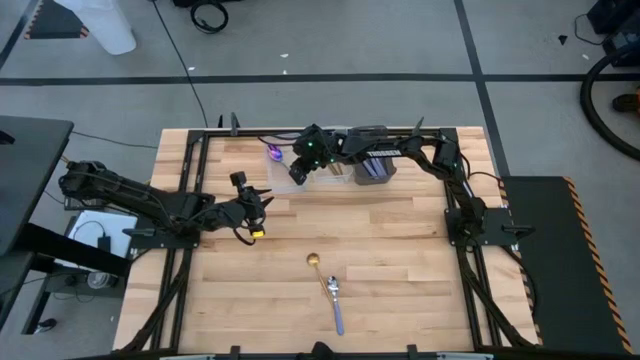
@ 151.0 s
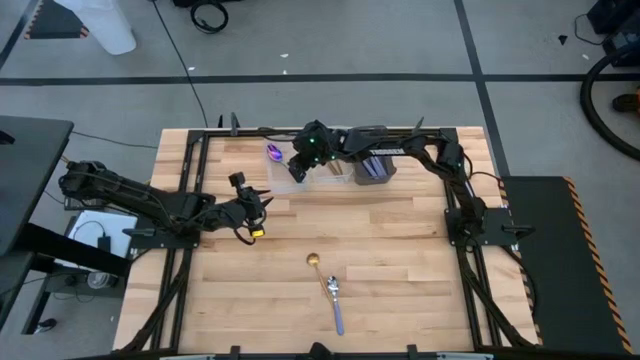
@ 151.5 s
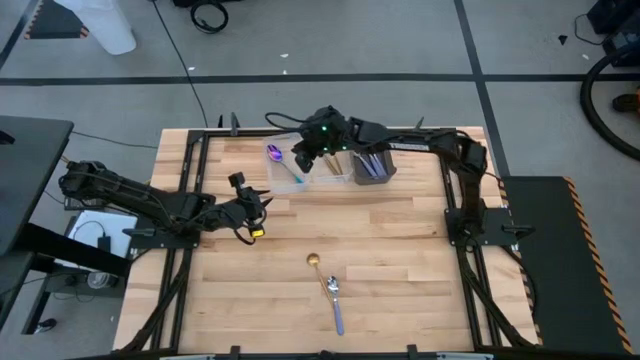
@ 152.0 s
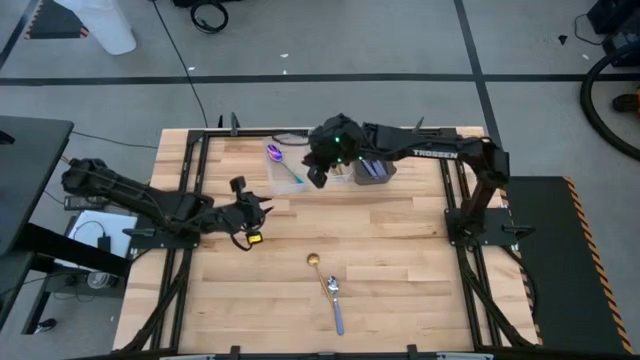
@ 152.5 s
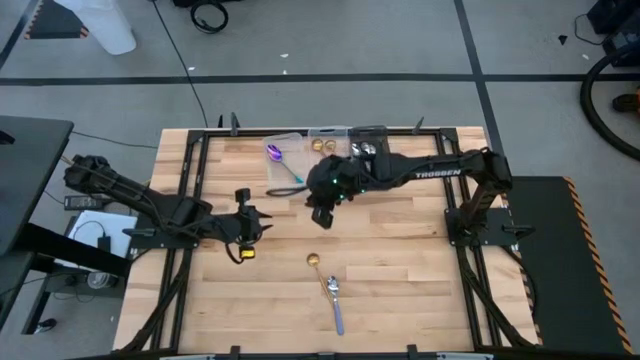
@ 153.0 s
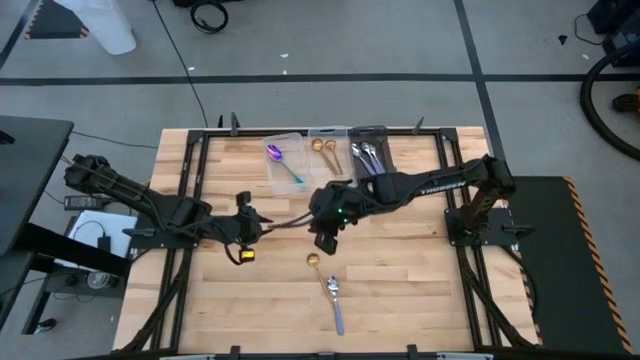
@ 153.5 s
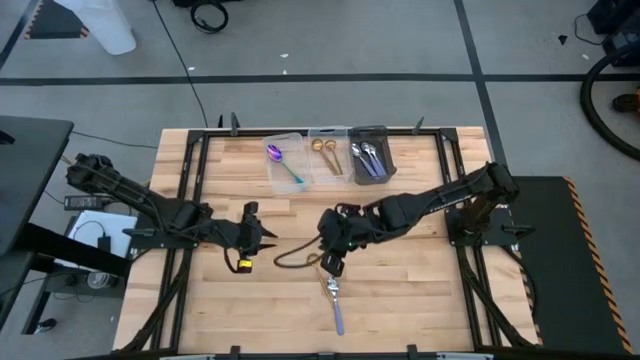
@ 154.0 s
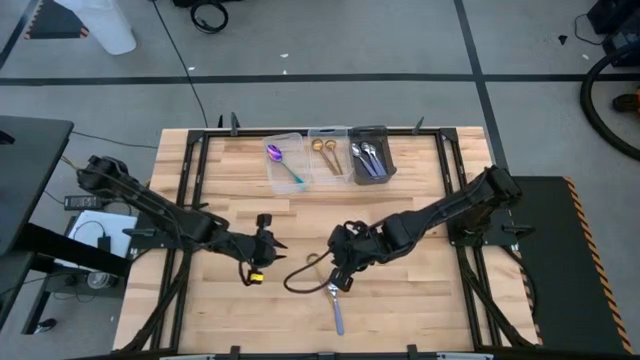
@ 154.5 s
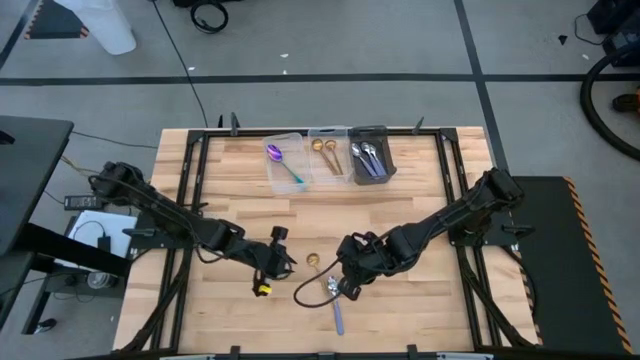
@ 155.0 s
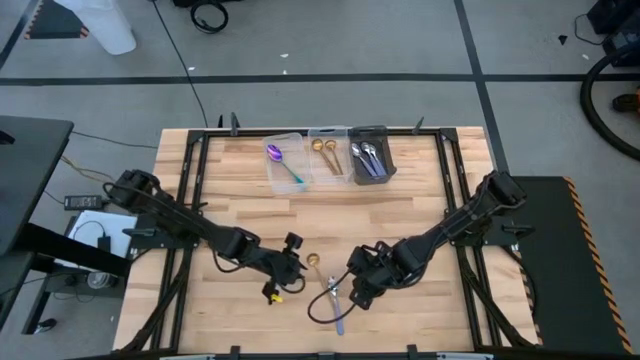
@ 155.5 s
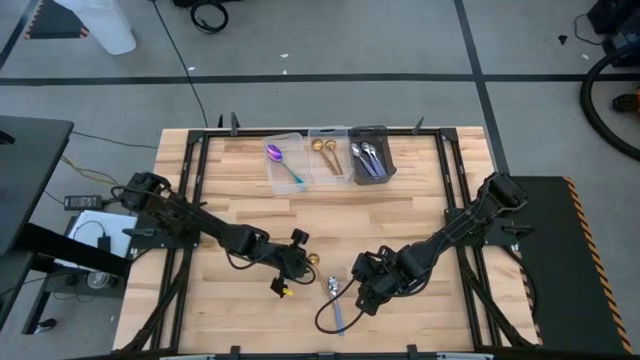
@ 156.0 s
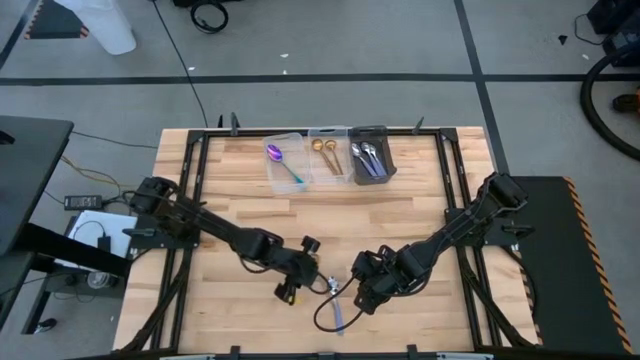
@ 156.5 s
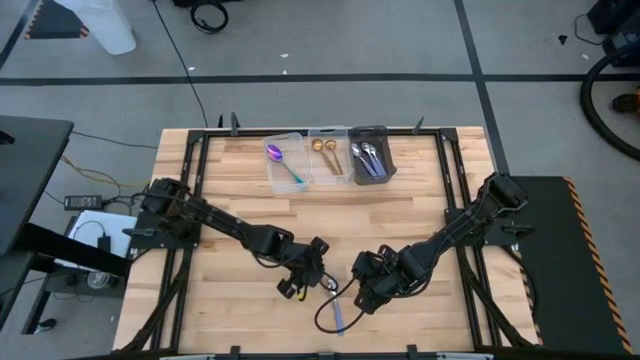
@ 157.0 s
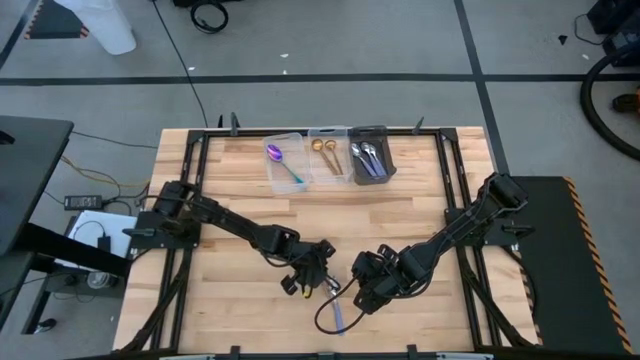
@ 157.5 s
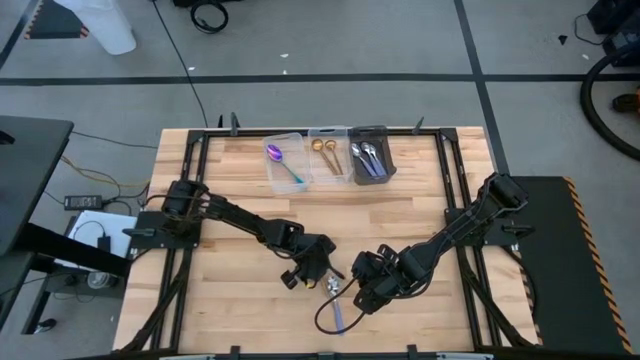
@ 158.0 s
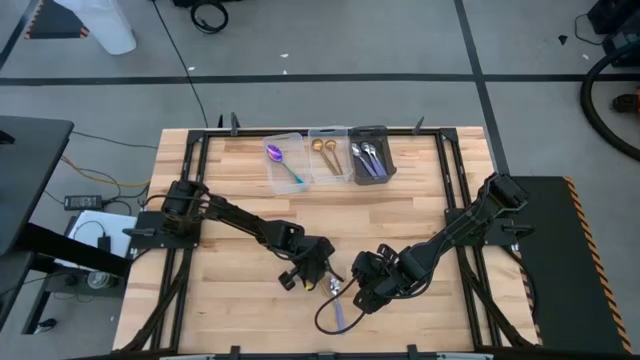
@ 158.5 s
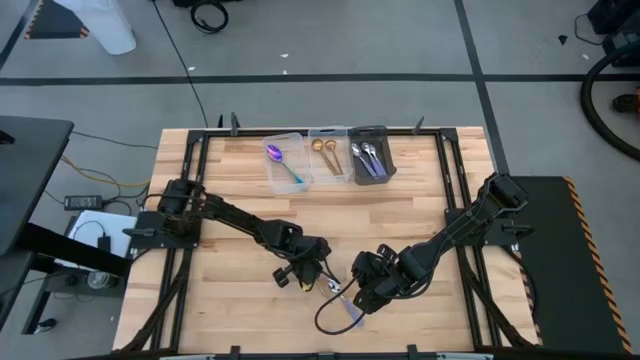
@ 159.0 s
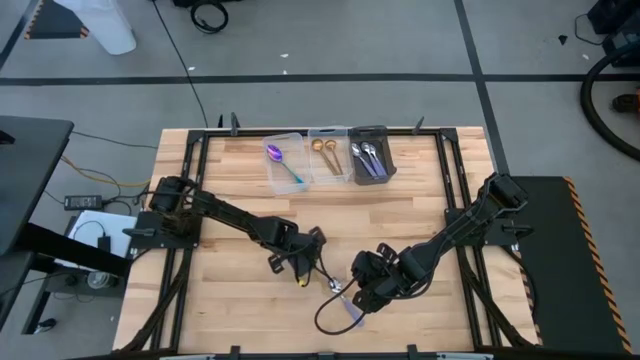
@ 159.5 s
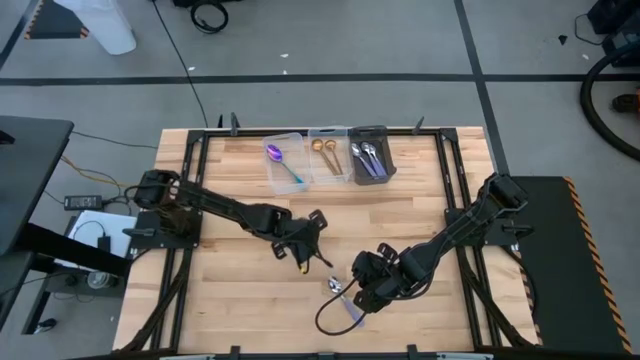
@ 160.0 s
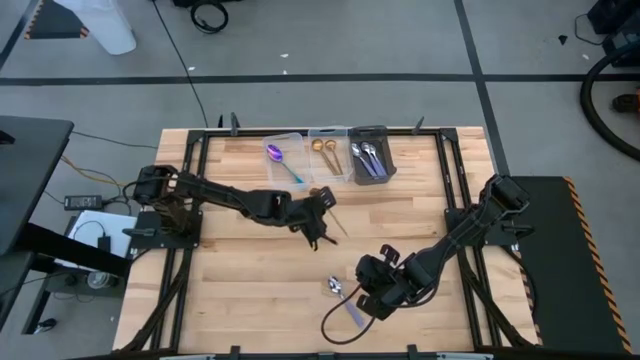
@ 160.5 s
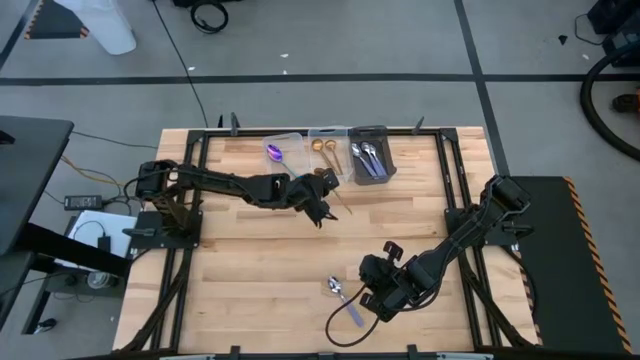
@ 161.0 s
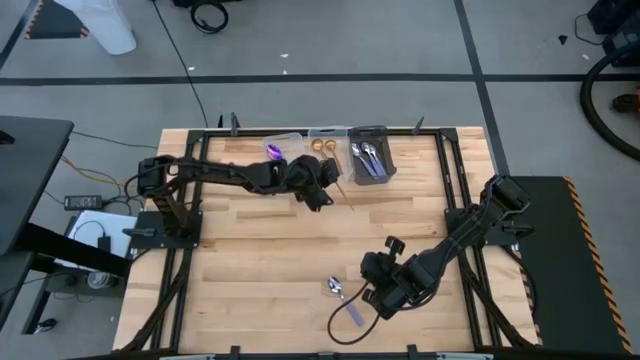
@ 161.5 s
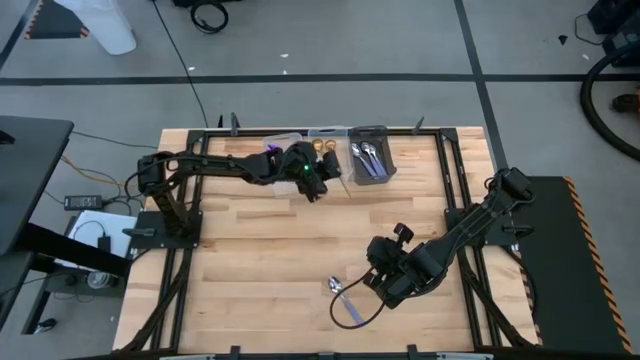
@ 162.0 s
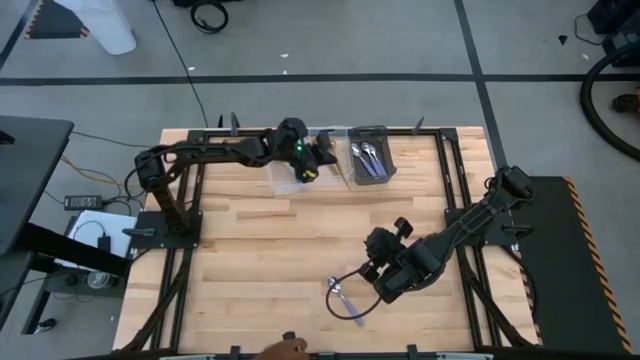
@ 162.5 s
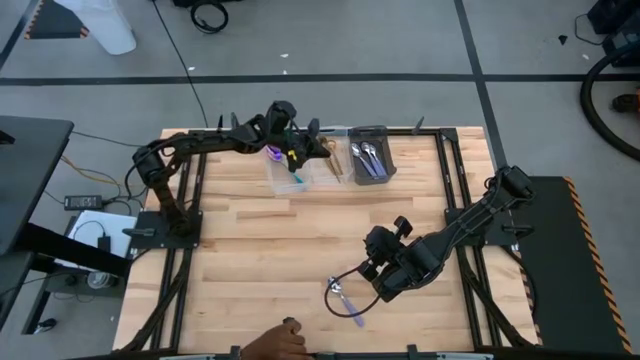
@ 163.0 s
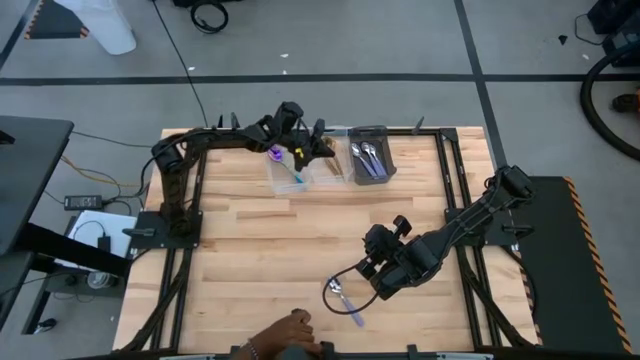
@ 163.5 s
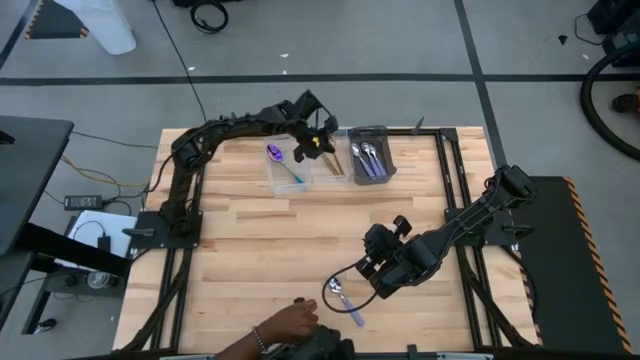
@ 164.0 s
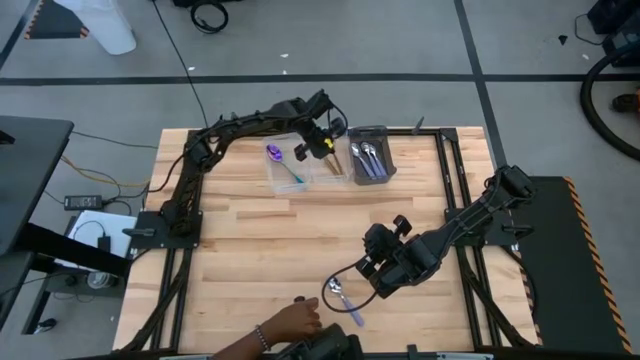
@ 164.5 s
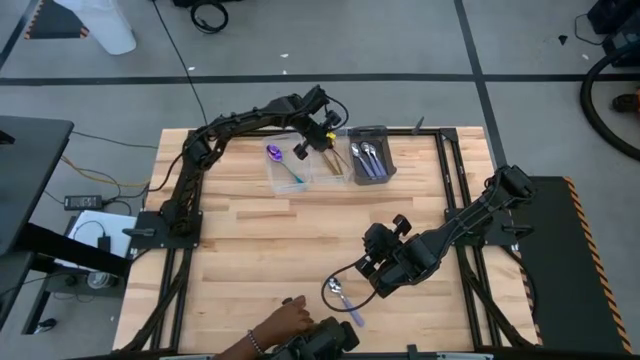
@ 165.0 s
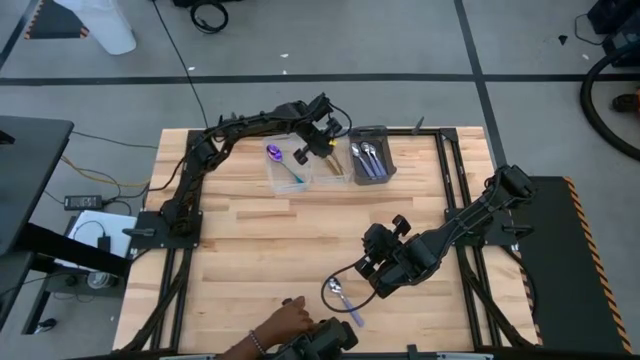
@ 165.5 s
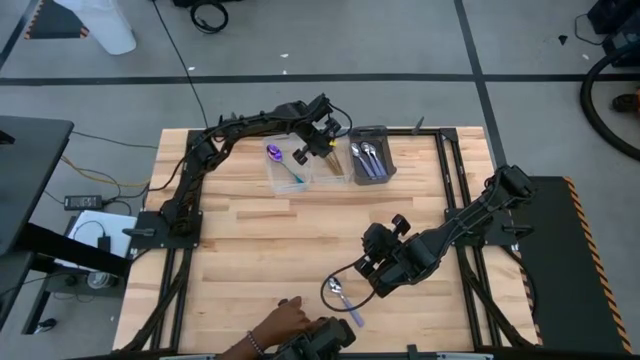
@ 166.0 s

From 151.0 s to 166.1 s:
Task: Sort silverware by color (type)
Put the gold spoon into the right transparent bin

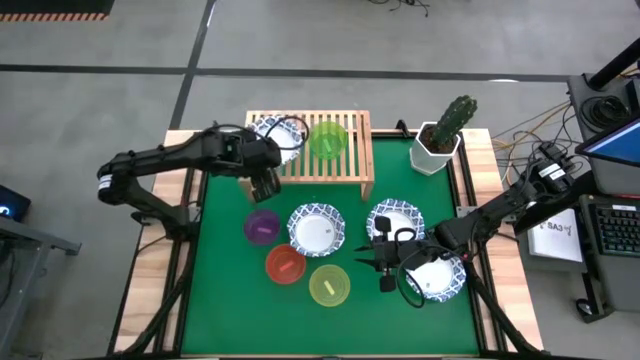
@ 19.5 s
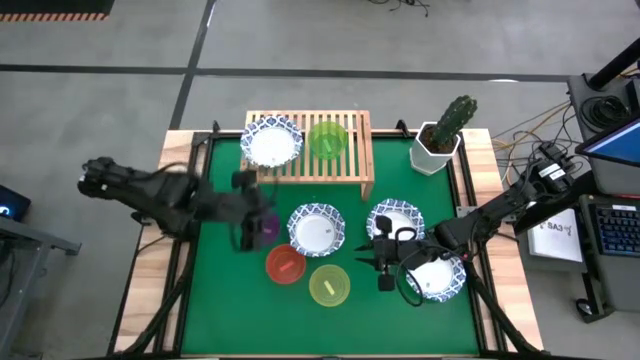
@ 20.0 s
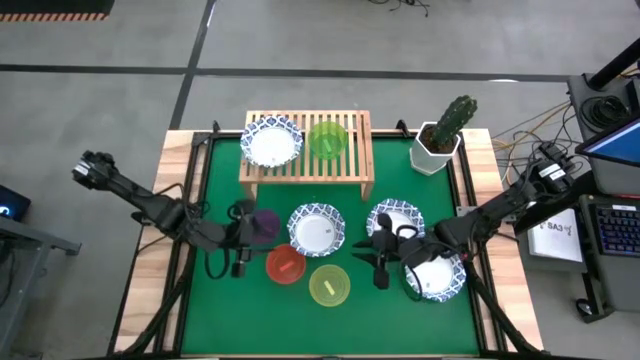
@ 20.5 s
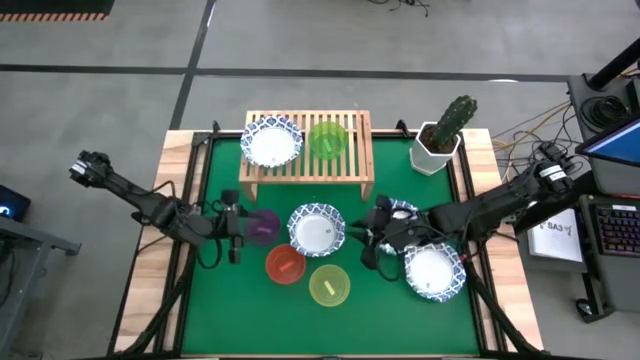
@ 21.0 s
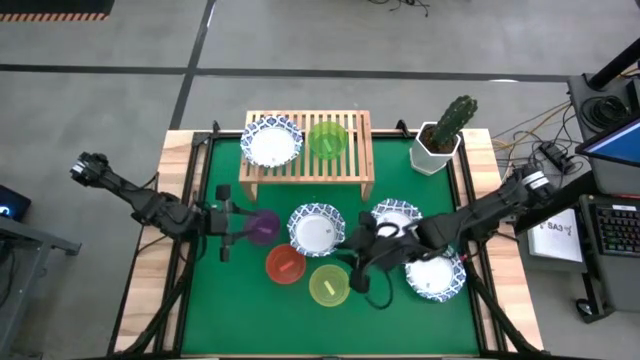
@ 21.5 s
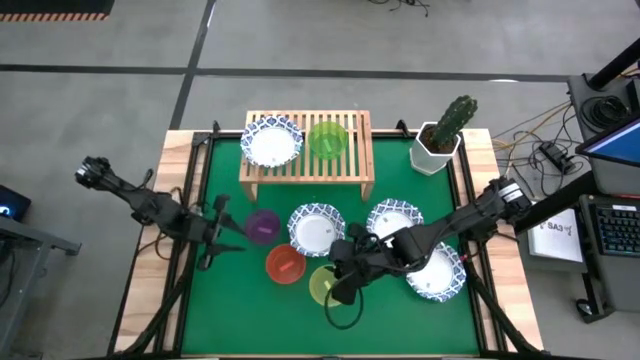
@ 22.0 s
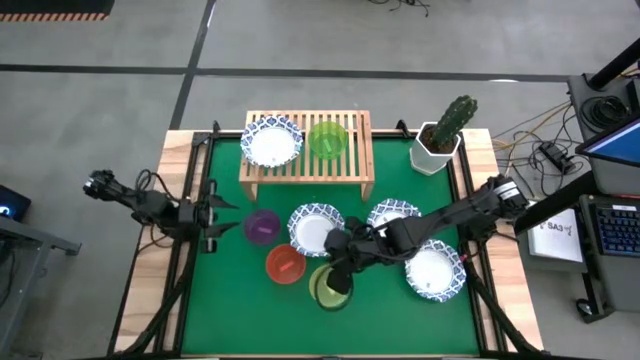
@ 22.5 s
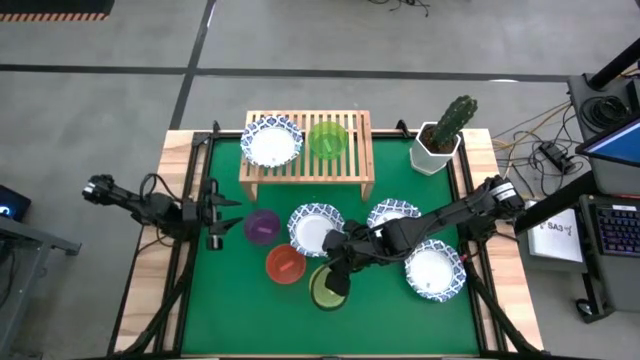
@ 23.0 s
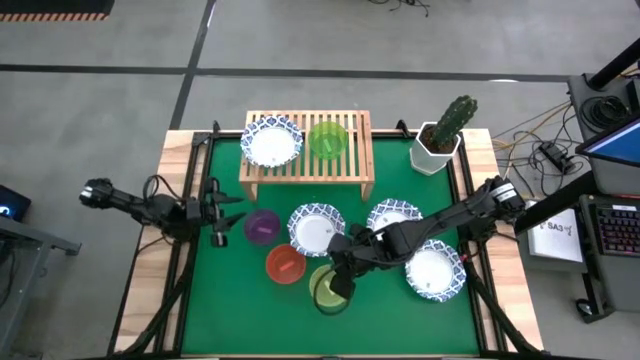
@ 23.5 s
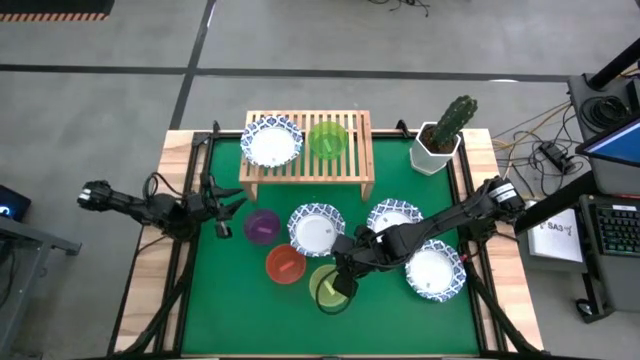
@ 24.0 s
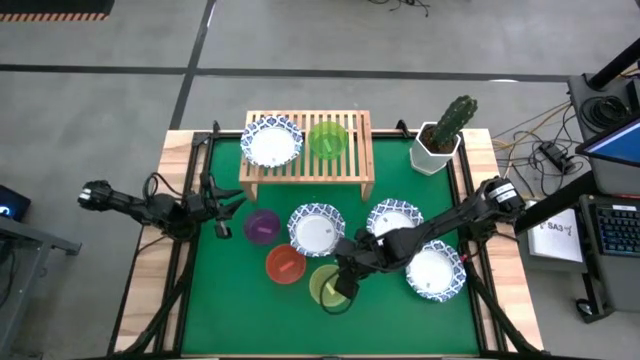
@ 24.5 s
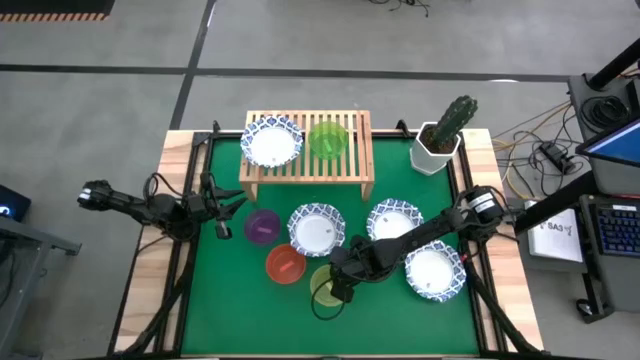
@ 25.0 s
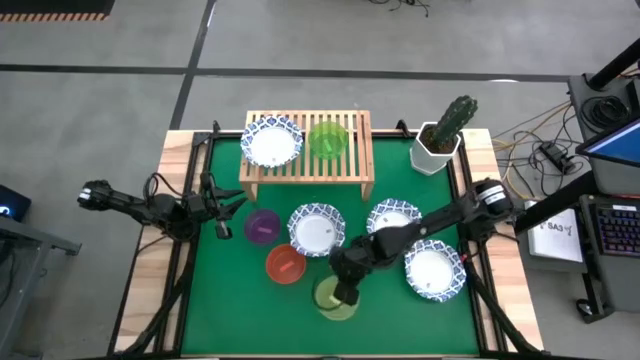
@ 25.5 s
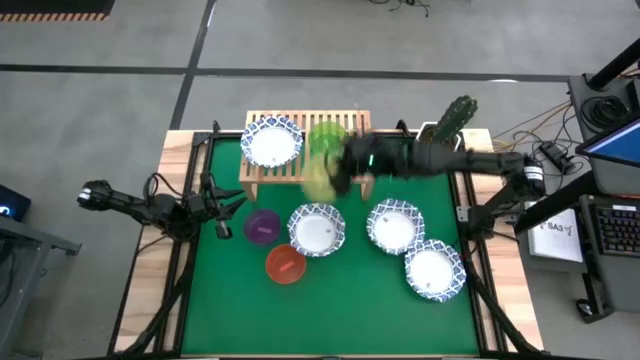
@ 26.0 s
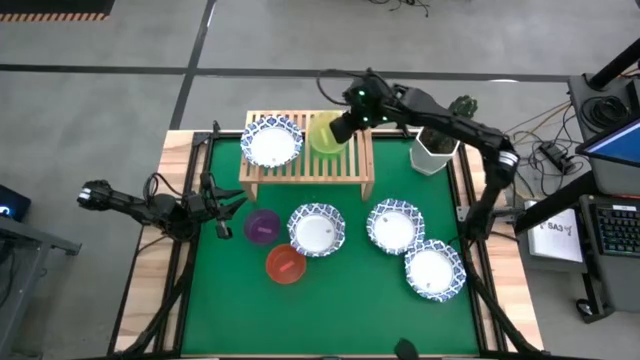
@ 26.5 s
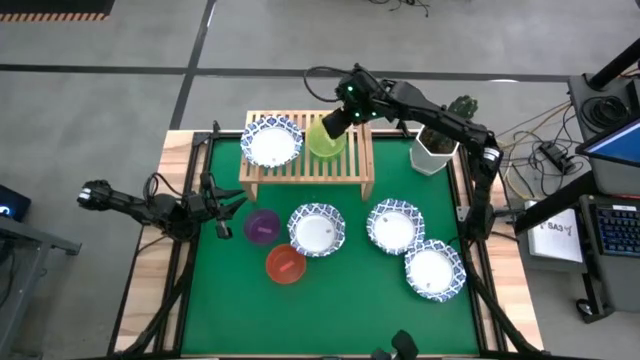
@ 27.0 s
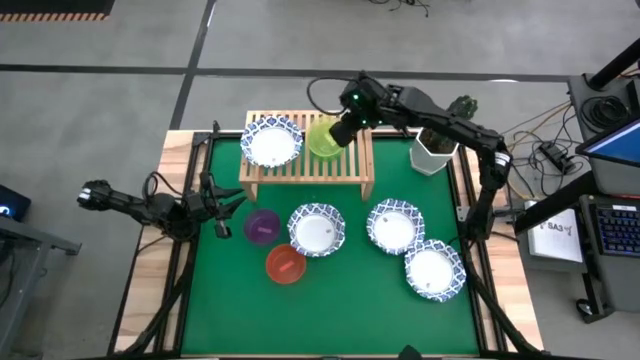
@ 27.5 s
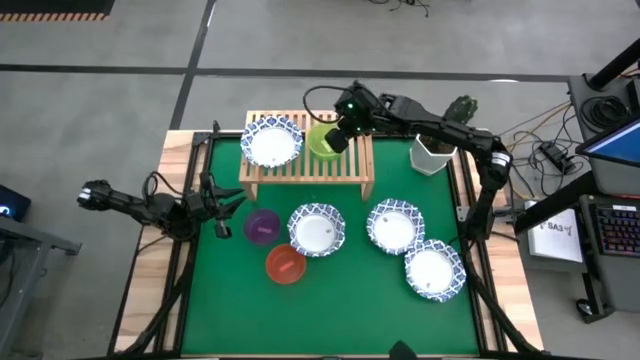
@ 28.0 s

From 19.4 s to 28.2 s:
Task: Place and stack bowls onto a shelf
Stack the small yellow bowl on top of the small green bowl on the shelf
